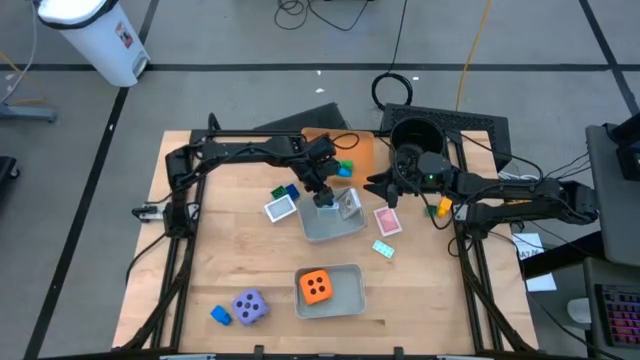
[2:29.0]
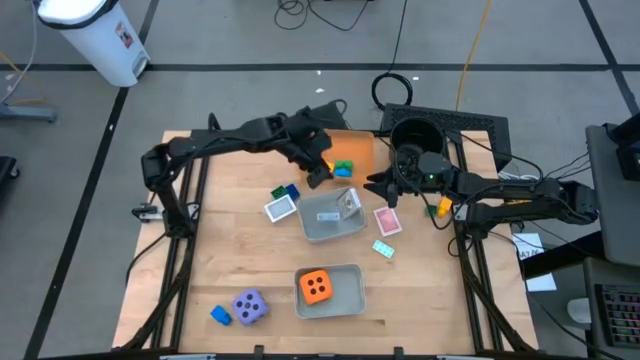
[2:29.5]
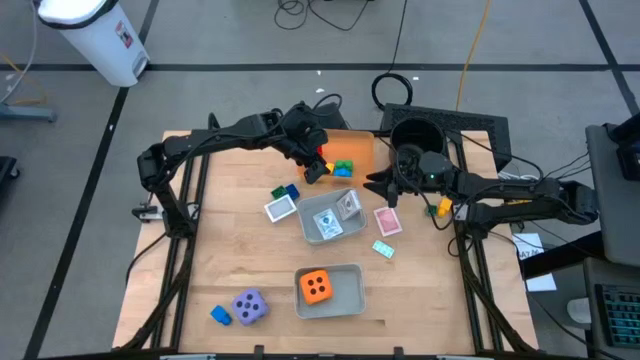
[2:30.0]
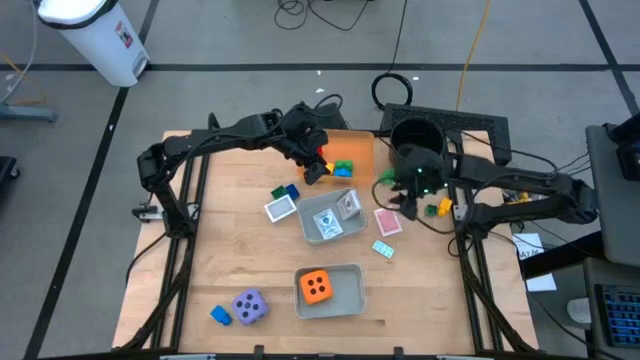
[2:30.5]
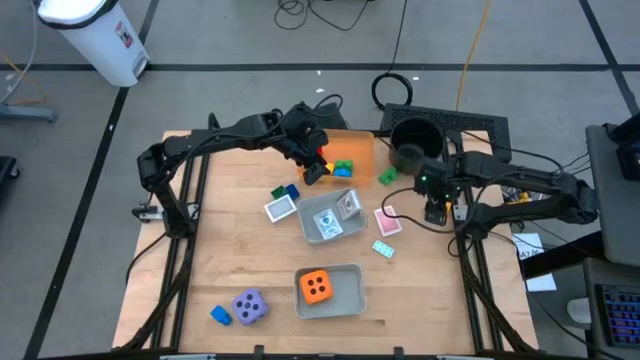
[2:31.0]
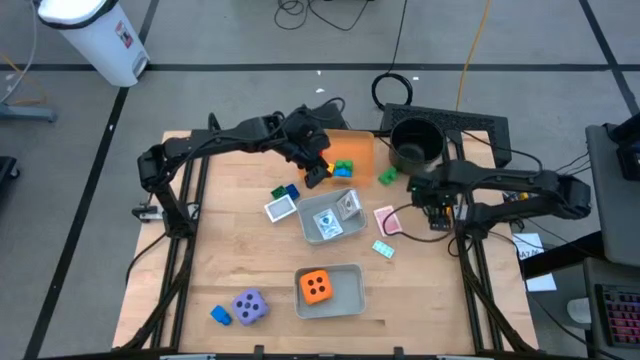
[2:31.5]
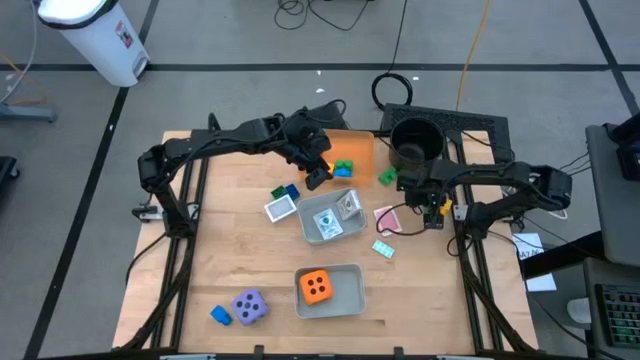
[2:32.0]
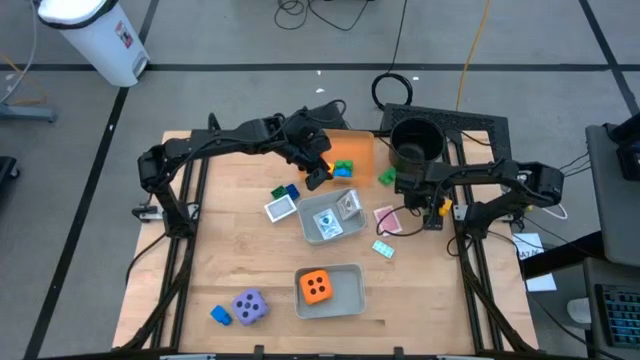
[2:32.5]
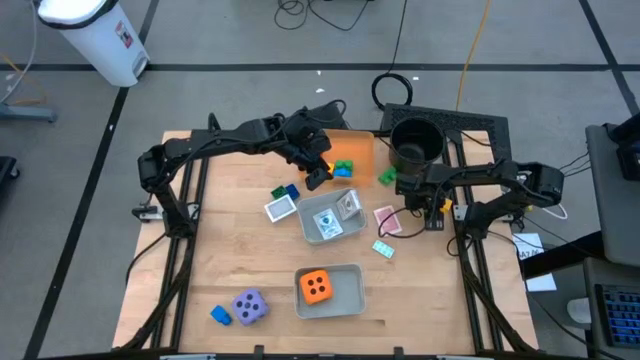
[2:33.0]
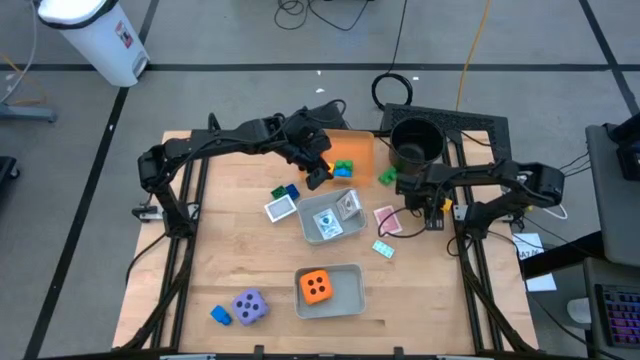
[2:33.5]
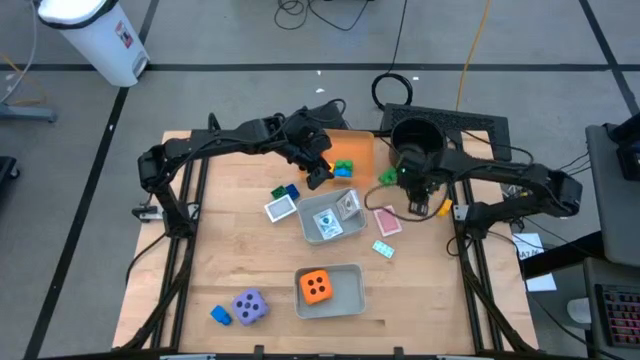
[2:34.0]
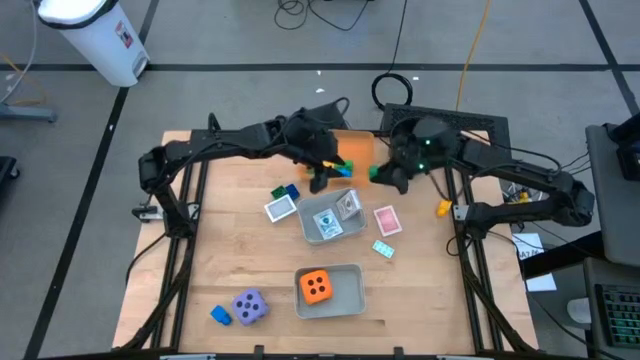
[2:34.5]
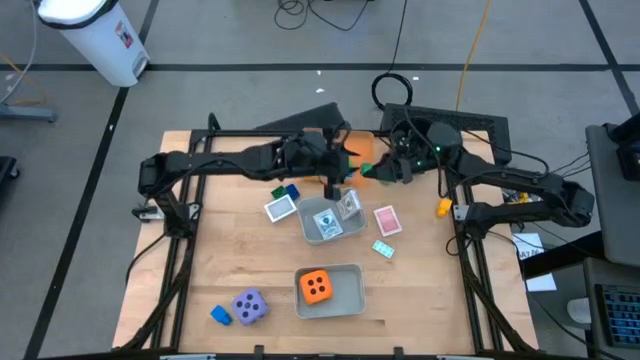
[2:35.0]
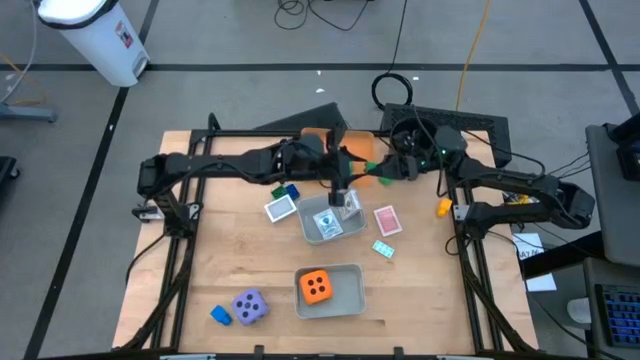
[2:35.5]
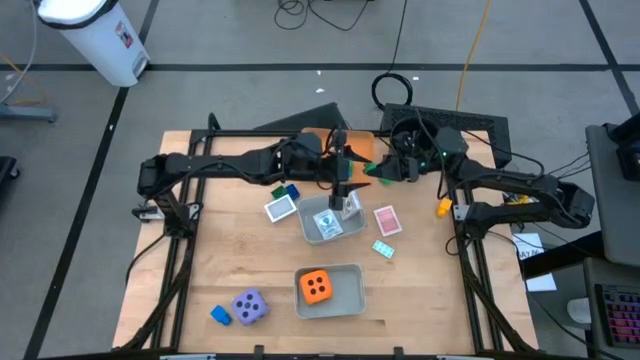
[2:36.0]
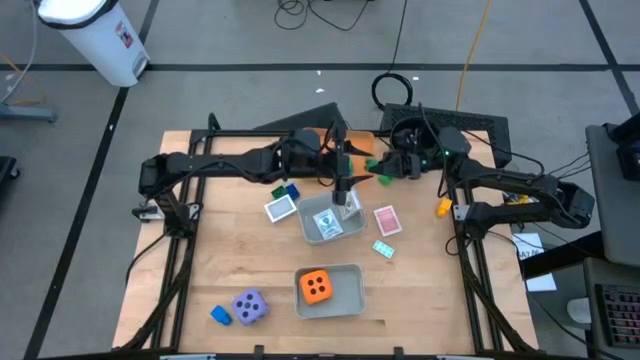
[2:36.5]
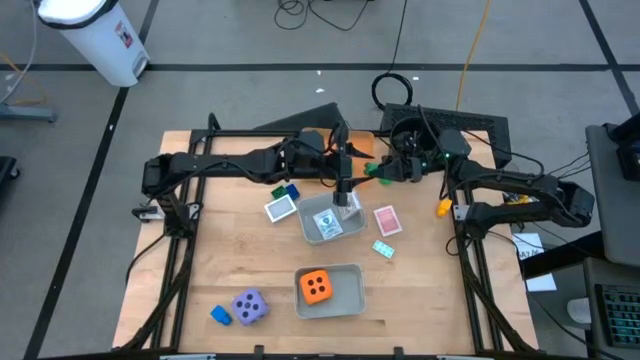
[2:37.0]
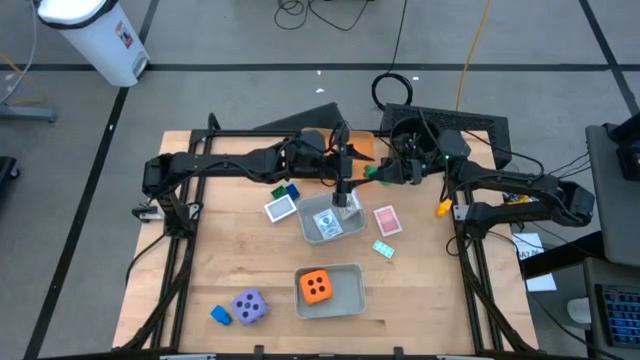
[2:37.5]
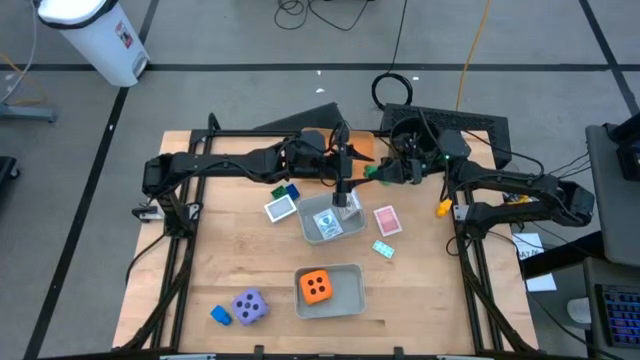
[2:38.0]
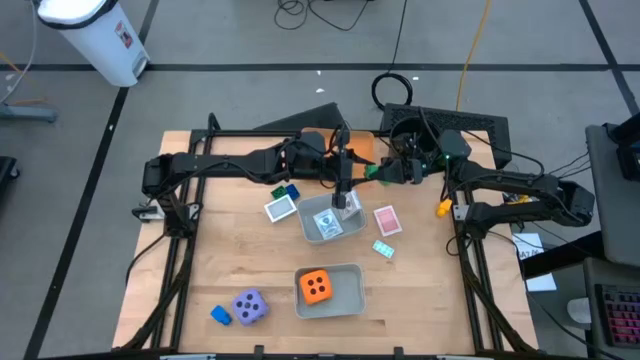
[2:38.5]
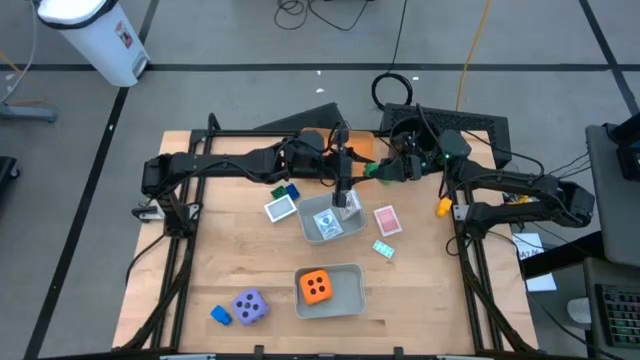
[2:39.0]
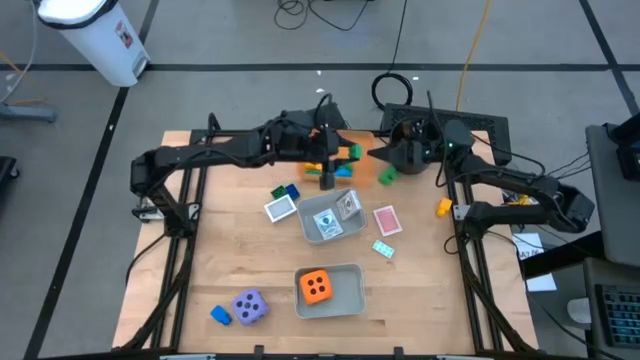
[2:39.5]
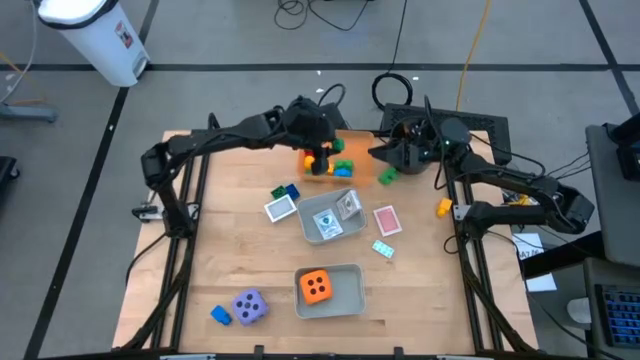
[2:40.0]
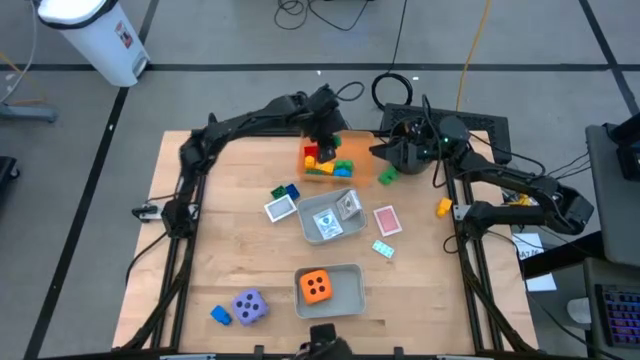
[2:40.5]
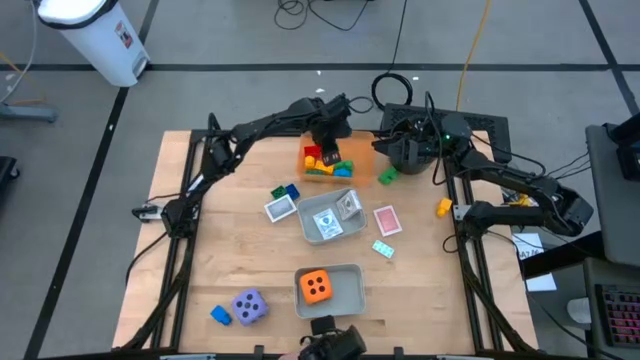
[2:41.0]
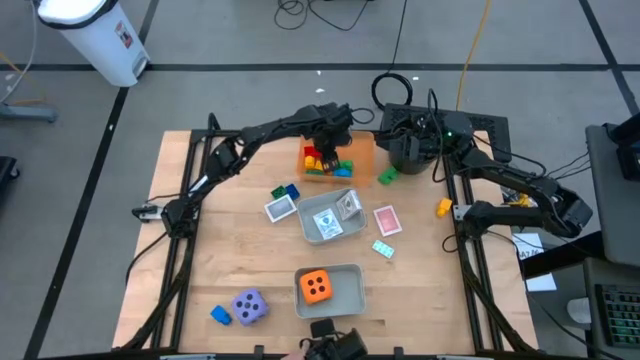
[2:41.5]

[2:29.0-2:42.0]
Task: Pick & Place Toys
Put the green game piece into the orange bin

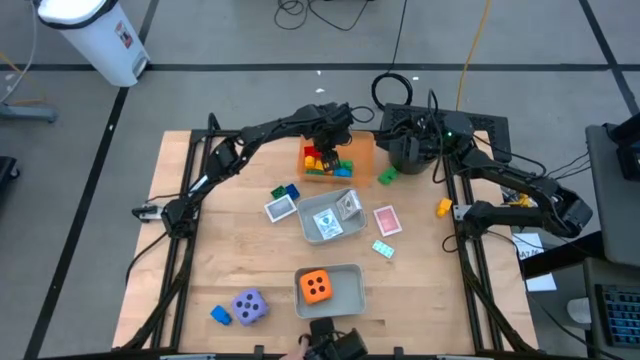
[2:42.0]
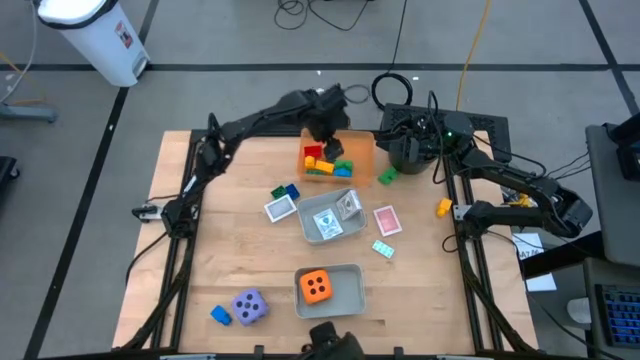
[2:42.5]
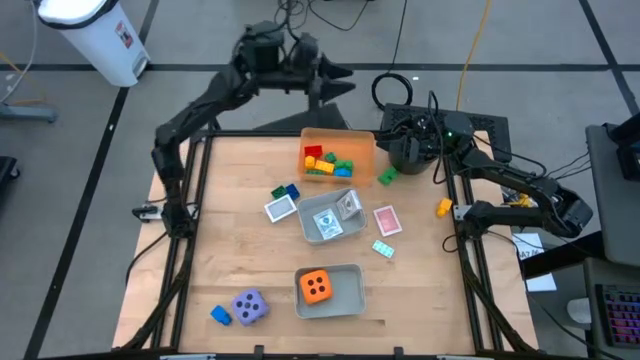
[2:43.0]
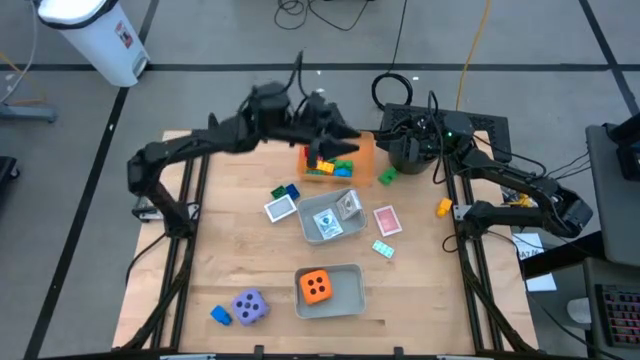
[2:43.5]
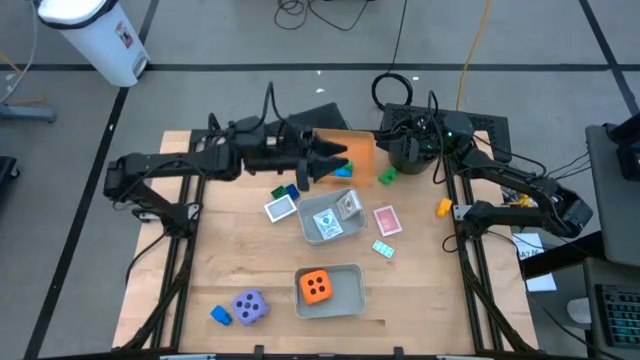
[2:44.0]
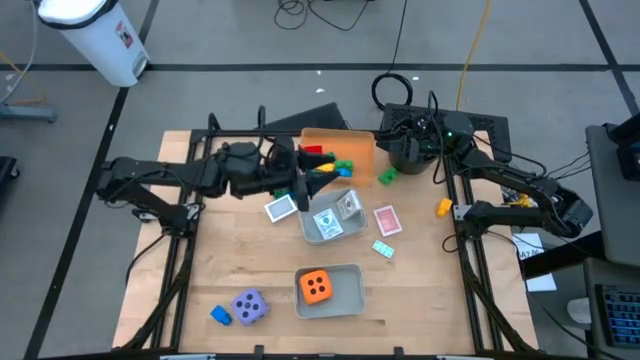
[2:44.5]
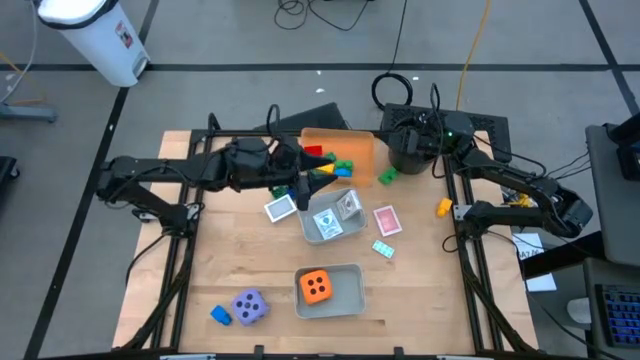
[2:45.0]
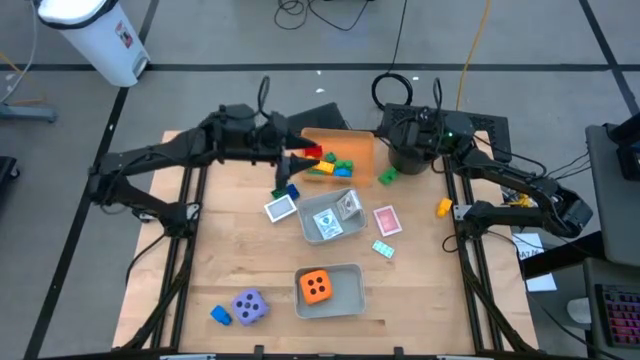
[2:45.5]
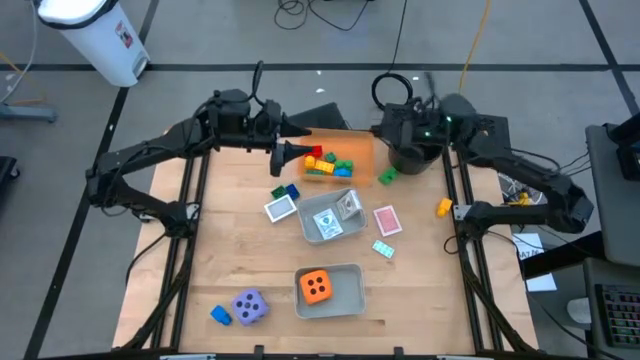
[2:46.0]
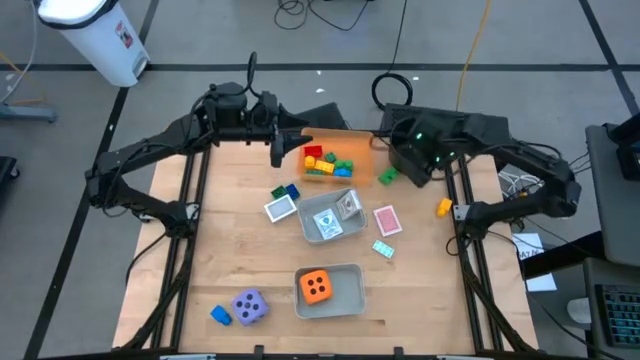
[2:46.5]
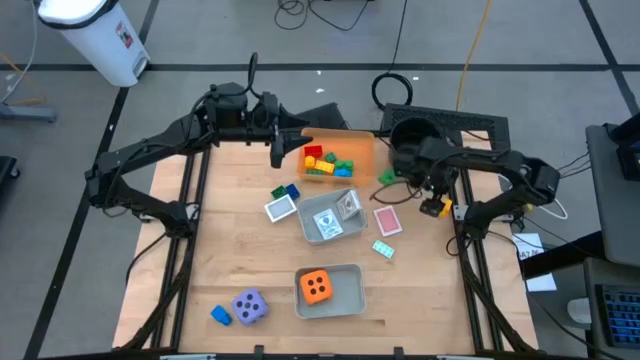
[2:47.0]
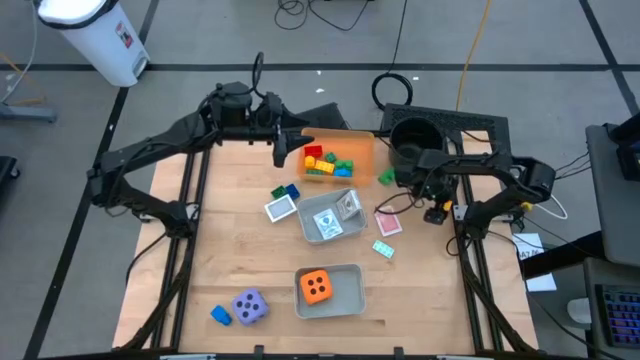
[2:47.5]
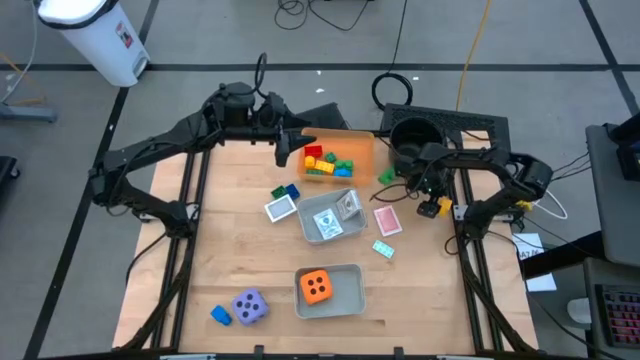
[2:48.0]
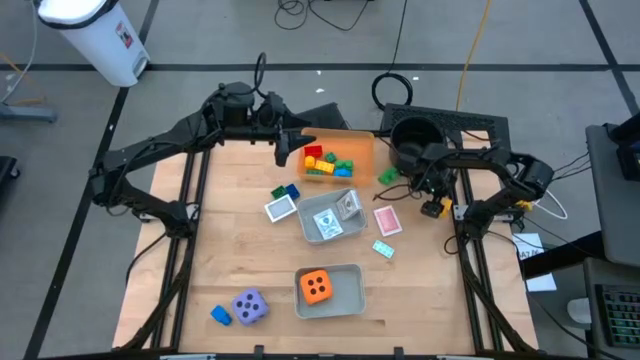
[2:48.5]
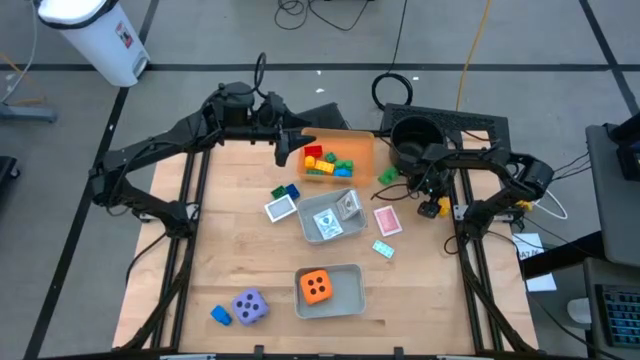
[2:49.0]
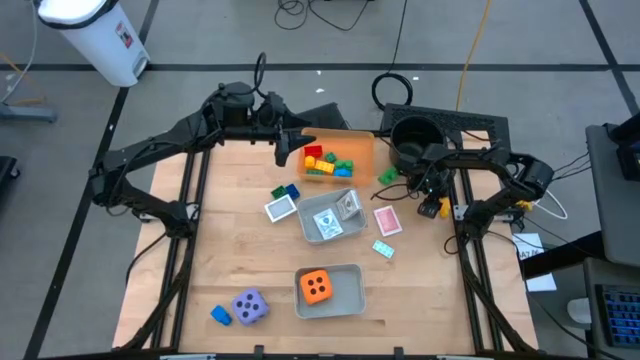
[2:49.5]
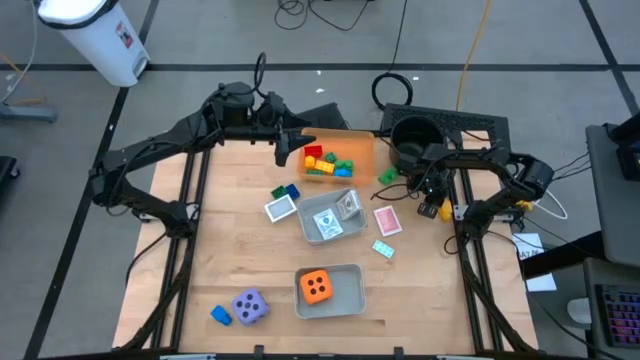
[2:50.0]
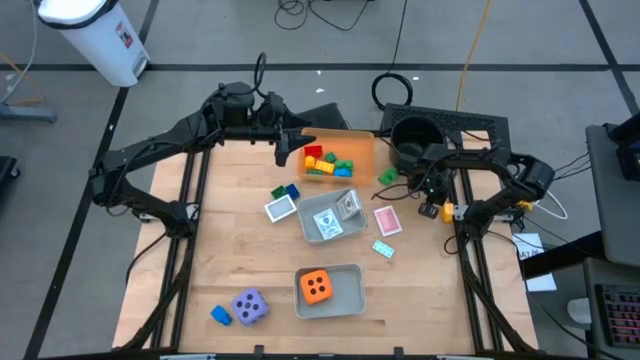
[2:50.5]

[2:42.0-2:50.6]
Put the yellow game piece into the orange bin
